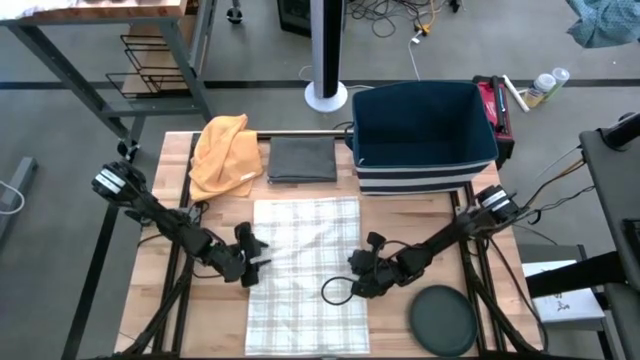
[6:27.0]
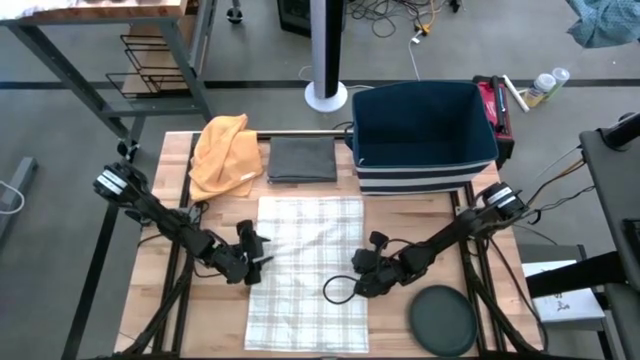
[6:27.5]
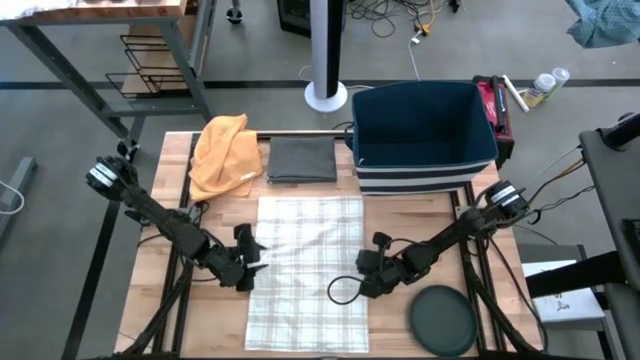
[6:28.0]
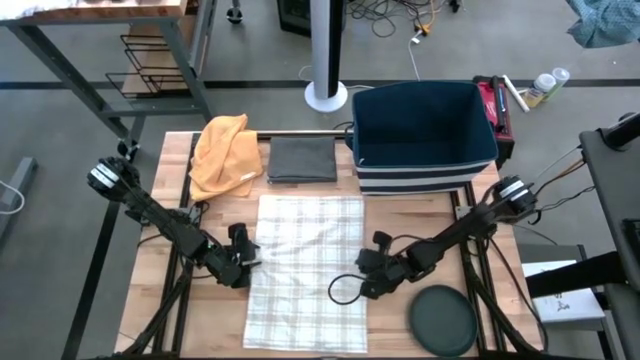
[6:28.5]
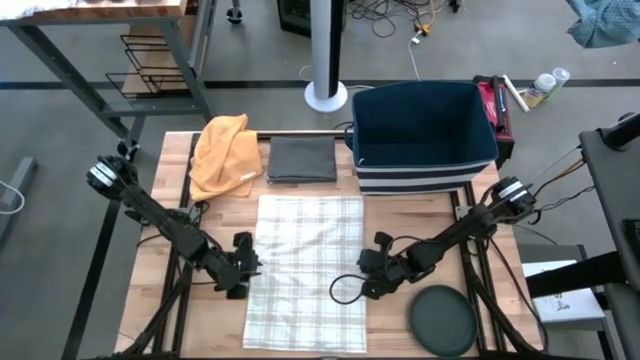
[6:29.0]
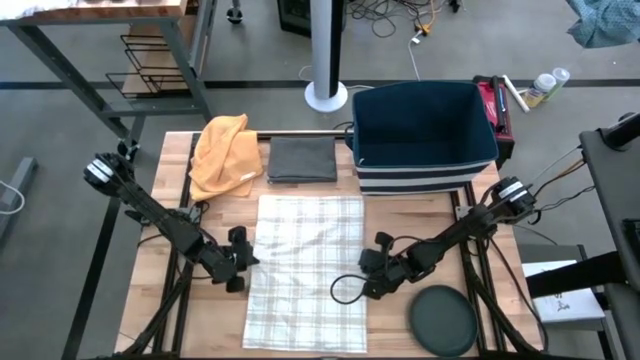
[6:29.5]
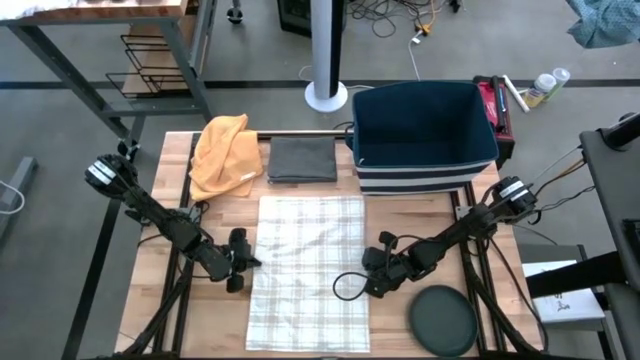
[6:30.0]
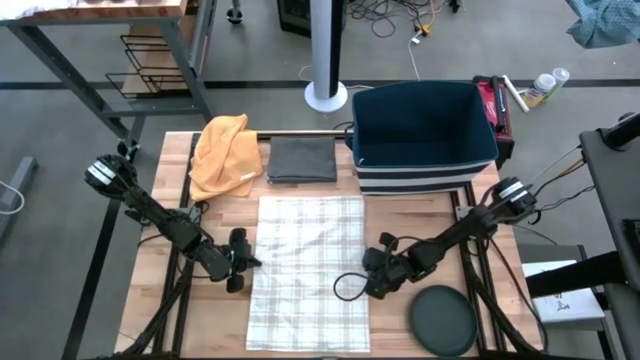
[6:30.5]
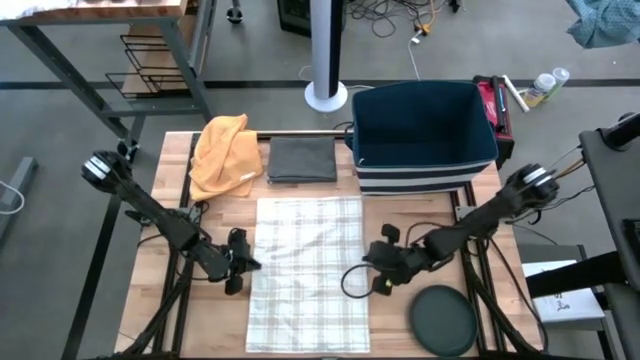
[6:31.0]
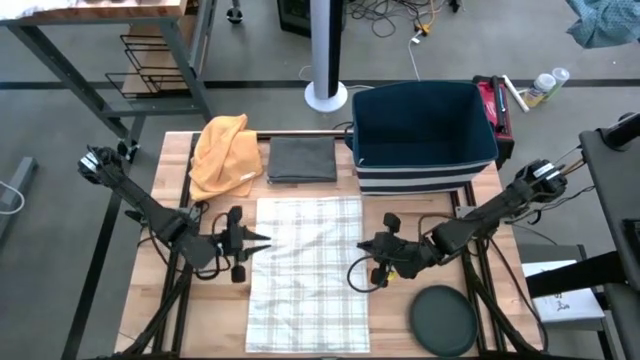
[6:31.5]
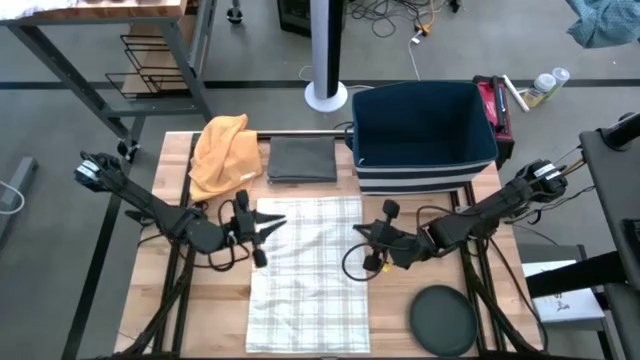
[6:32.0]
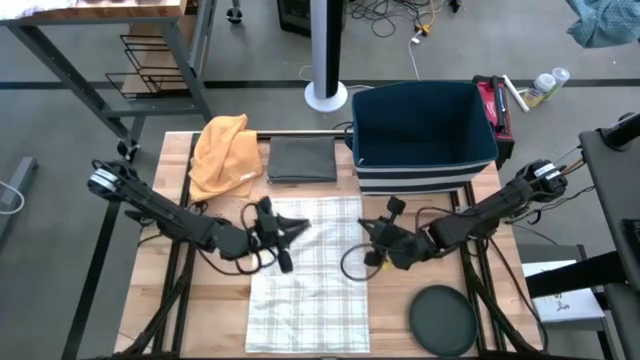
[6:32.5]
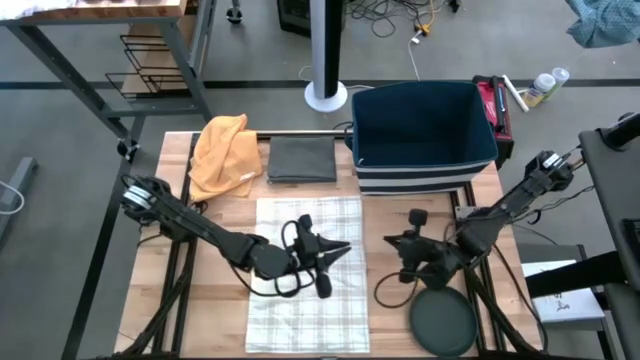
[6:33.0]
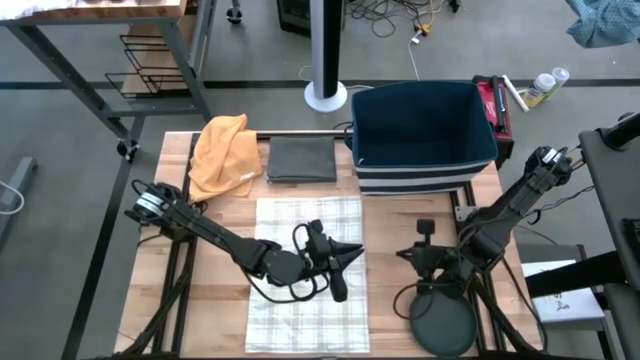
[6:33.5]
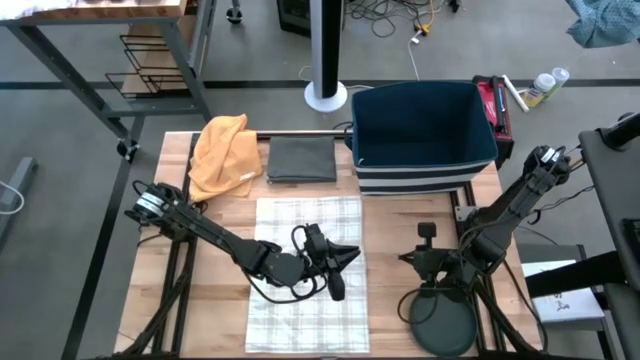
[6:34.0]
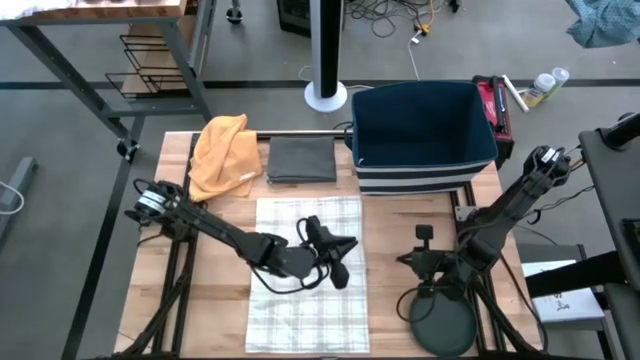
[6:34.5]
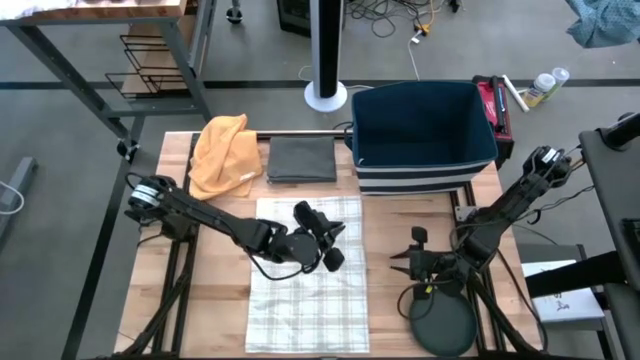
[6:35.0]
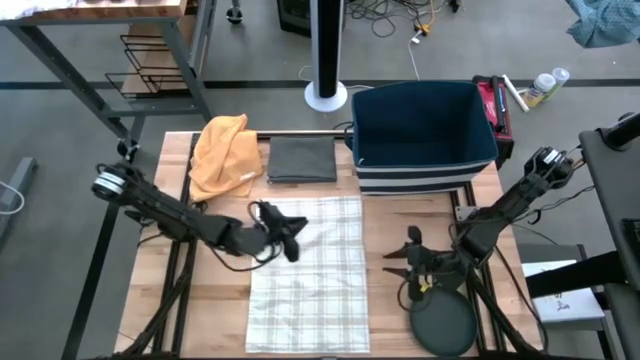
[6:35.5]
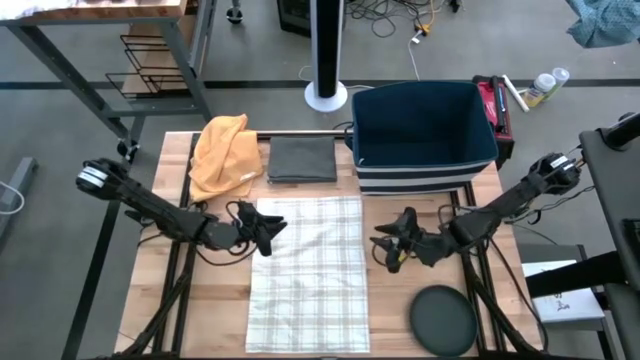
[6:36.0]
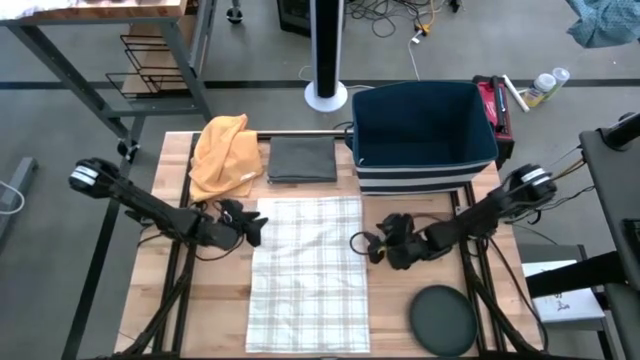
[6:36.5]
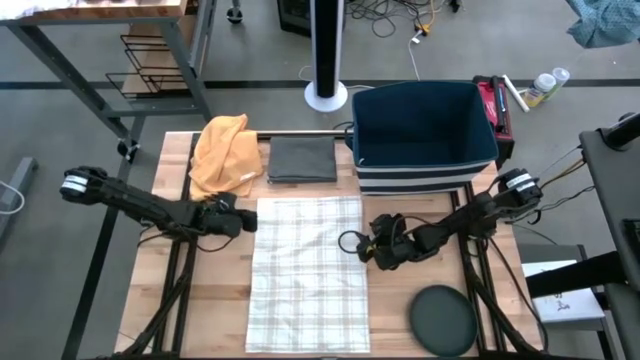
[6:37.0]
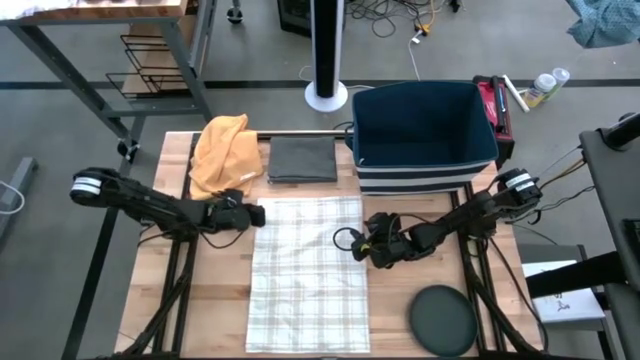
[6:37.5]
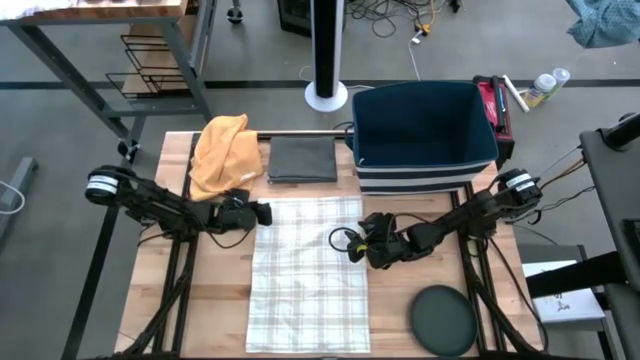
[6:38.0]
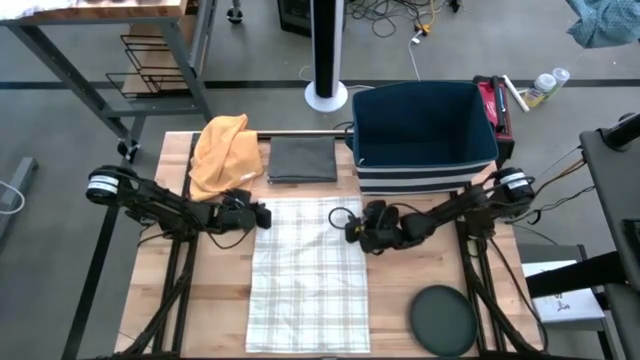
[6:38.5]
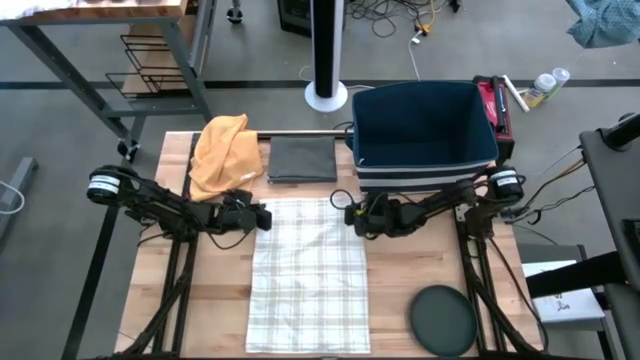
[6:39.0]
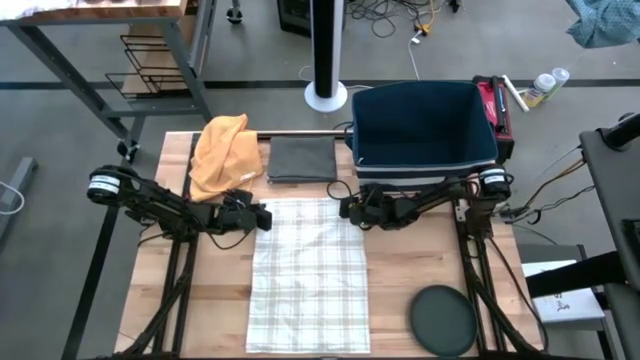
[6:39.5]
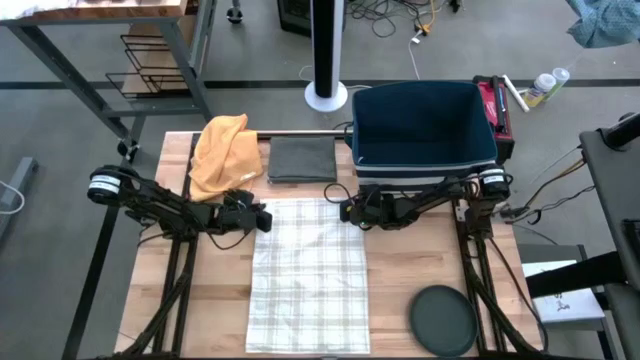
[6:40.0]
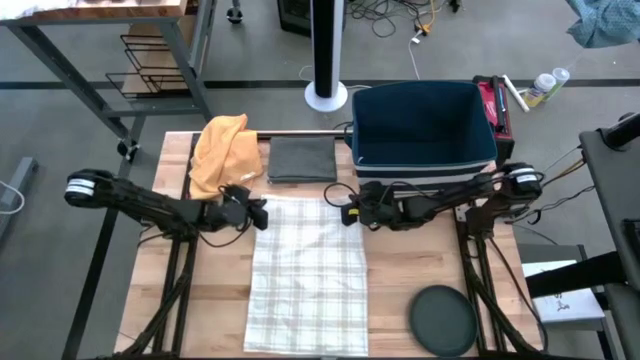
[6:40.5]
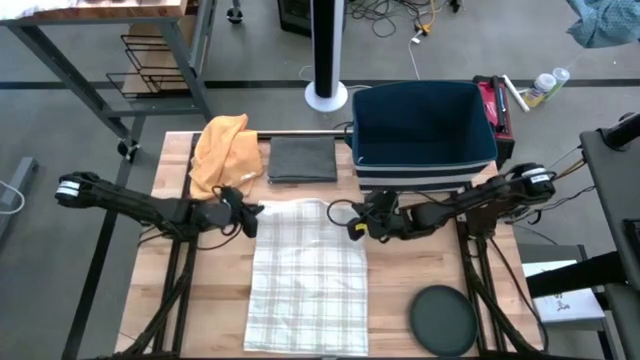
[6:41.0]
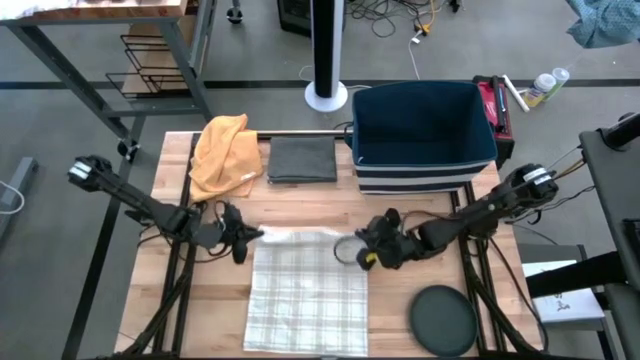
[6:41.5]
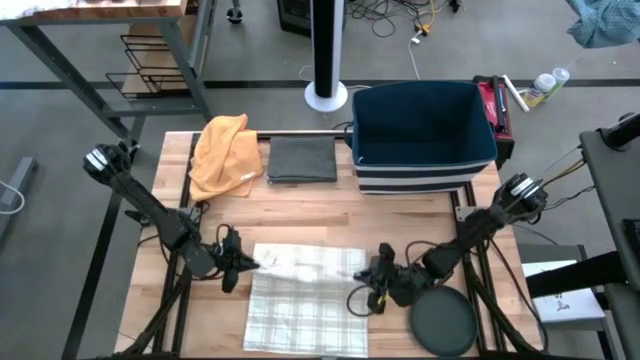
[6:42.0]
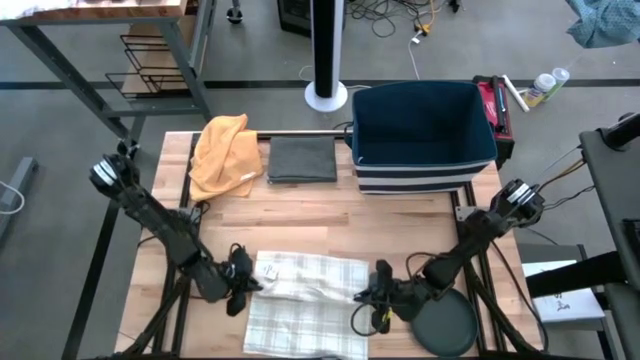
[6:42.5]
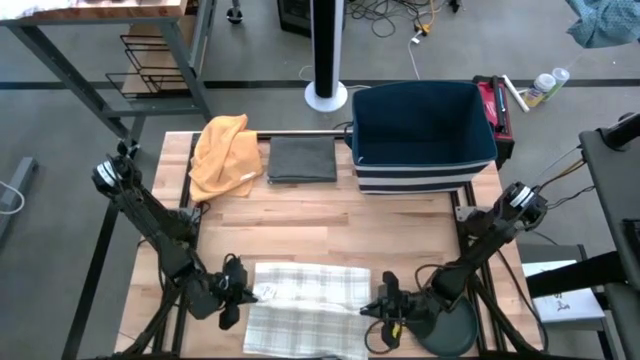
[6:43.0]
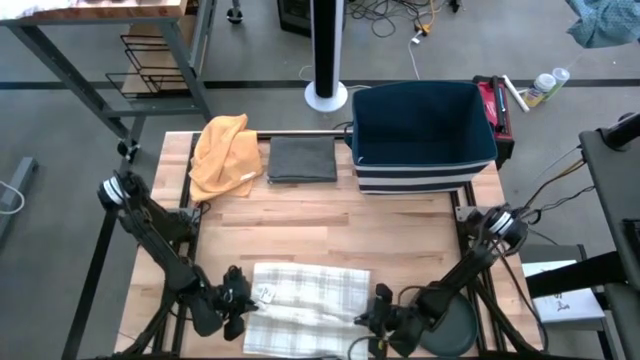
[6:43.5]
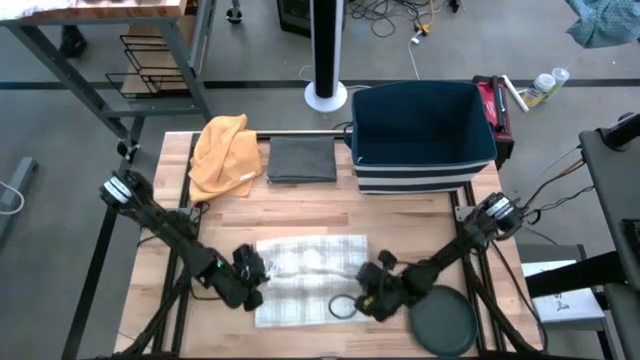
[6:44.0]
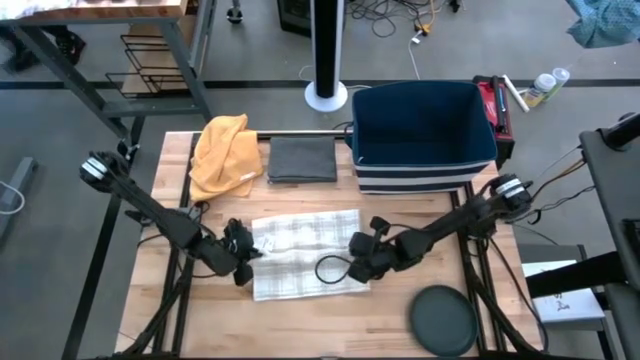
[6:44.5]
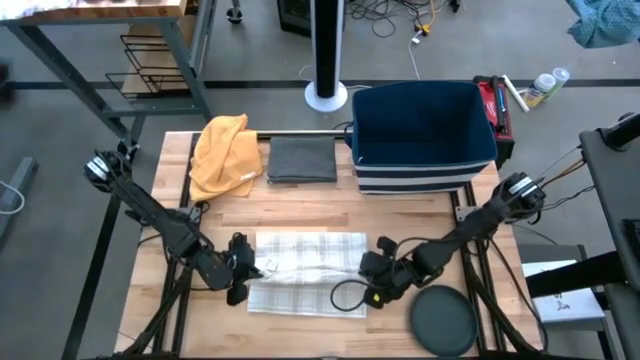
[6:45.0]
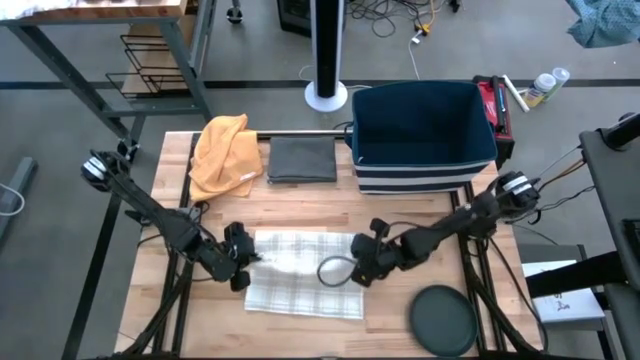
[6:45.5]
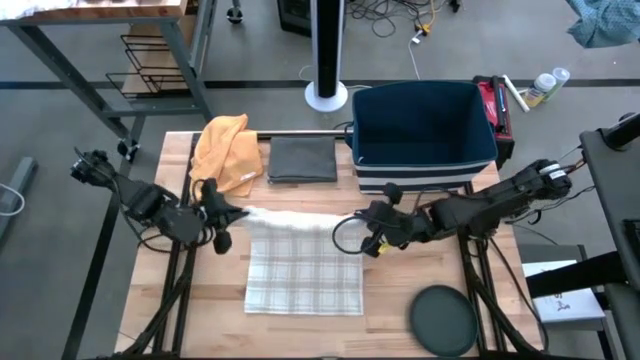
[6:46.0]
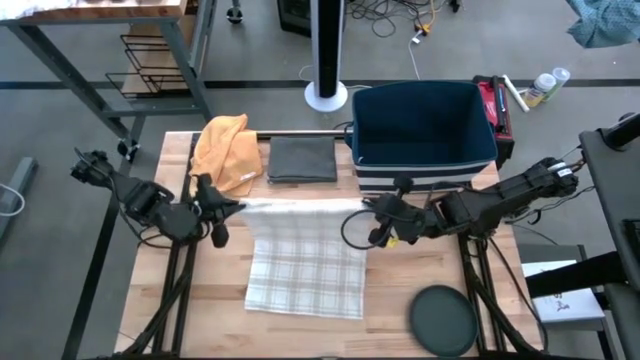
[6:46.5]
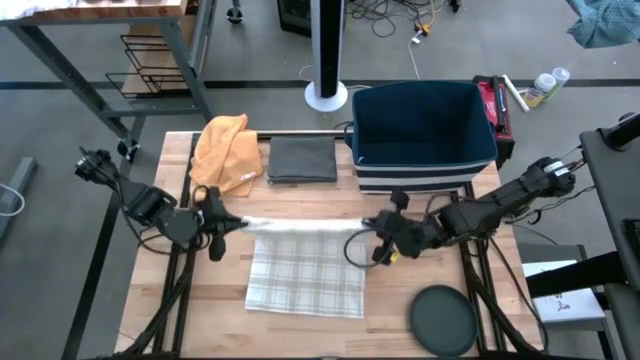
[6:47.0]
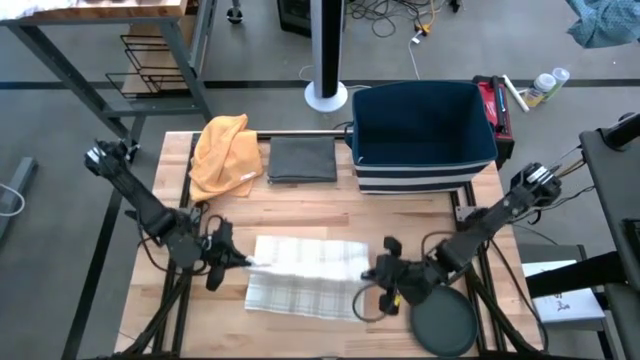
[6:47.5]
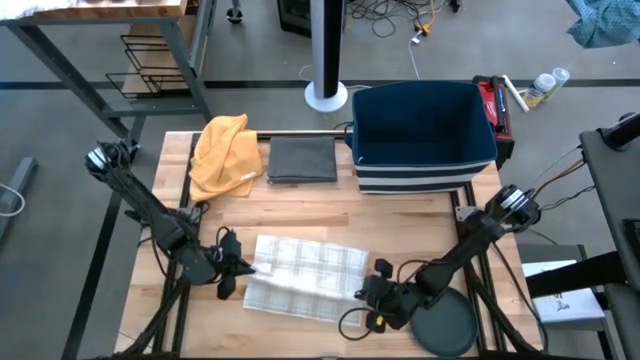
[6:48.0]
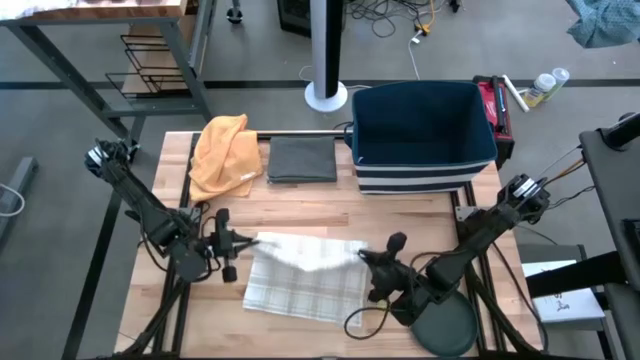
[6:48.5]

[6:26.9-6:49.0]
Task: Fold kitchen towel into neat rectangle
Fold the white patterned towel
